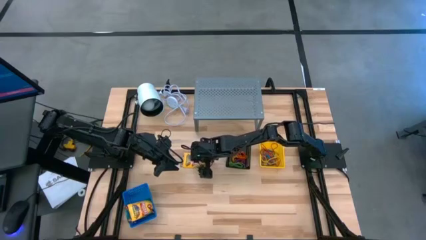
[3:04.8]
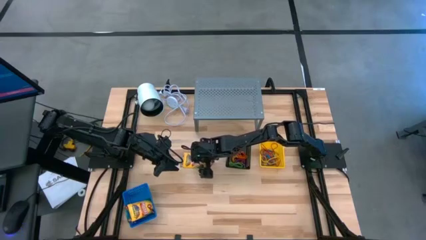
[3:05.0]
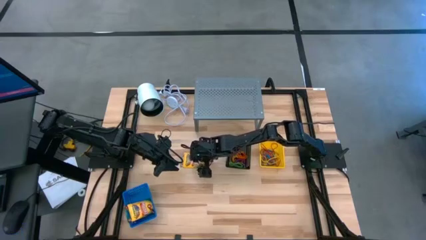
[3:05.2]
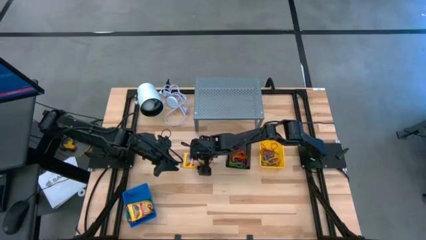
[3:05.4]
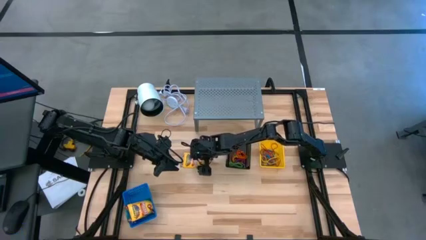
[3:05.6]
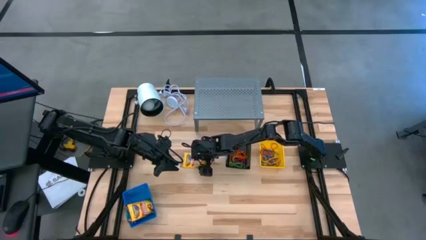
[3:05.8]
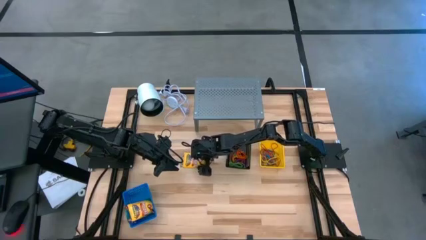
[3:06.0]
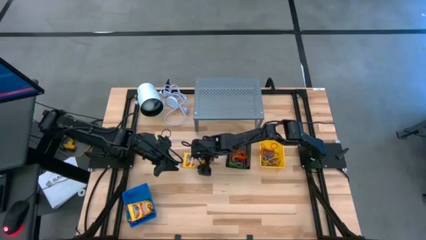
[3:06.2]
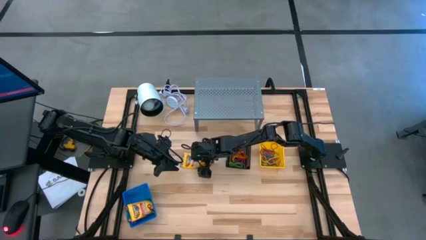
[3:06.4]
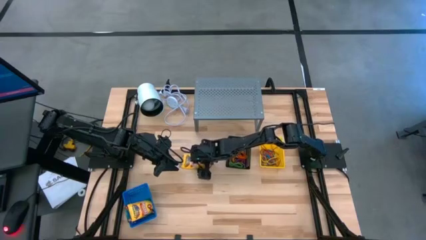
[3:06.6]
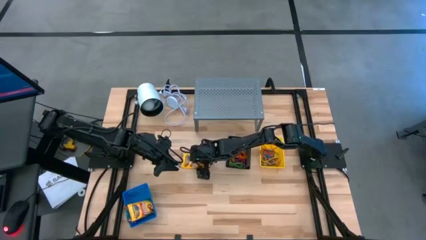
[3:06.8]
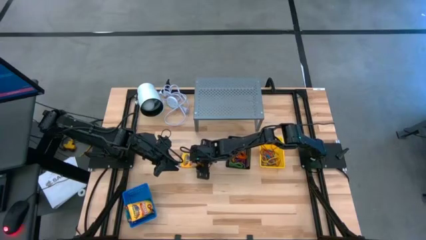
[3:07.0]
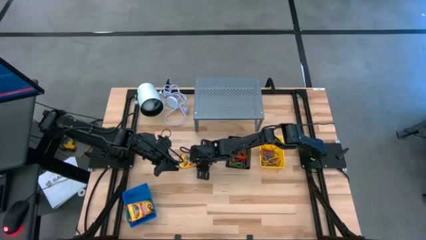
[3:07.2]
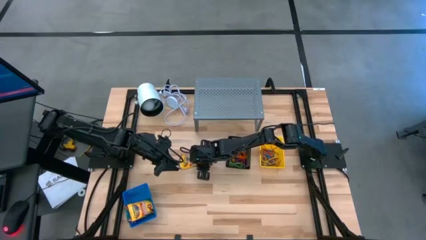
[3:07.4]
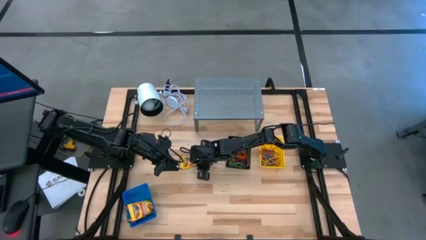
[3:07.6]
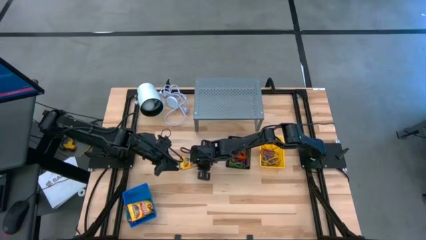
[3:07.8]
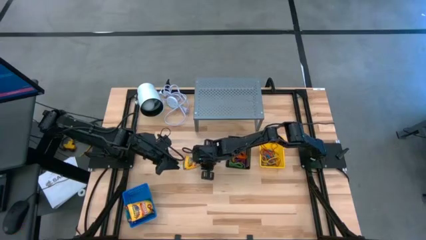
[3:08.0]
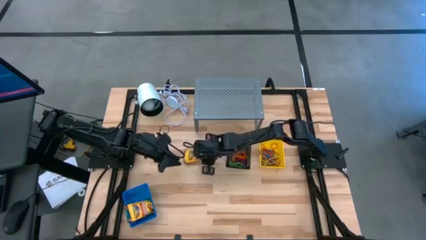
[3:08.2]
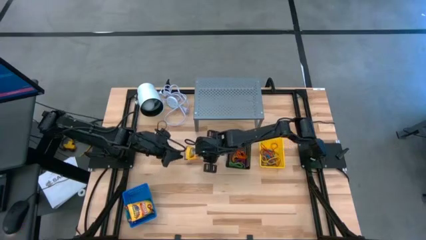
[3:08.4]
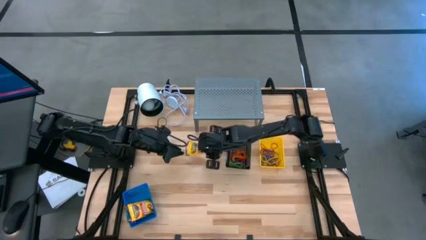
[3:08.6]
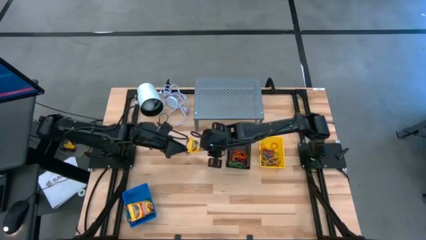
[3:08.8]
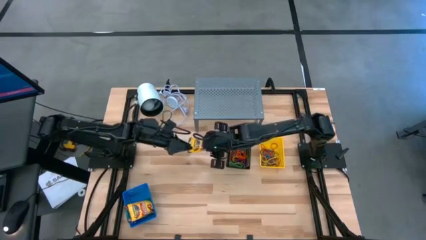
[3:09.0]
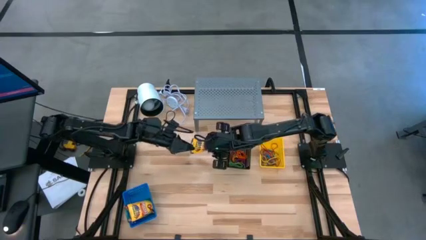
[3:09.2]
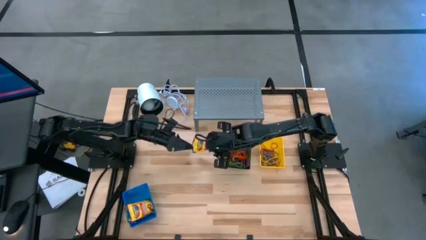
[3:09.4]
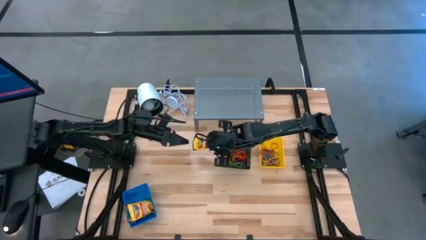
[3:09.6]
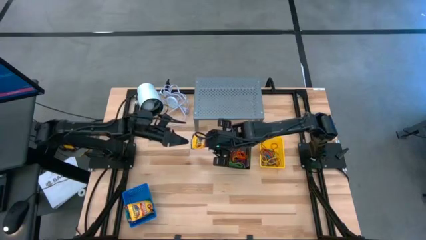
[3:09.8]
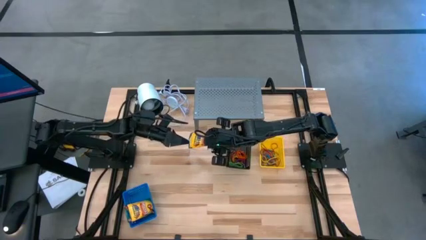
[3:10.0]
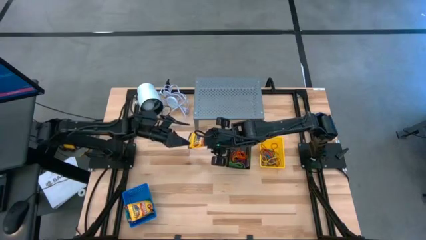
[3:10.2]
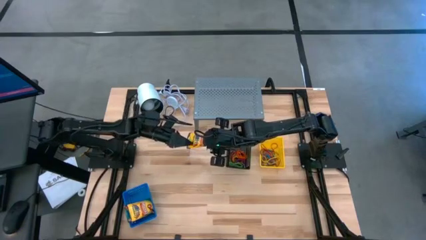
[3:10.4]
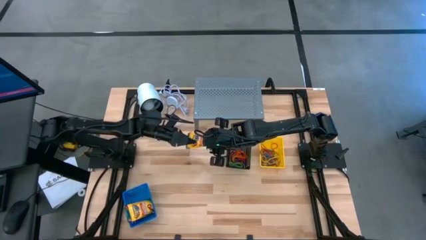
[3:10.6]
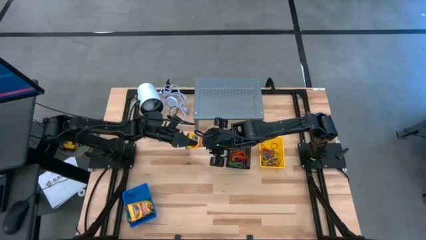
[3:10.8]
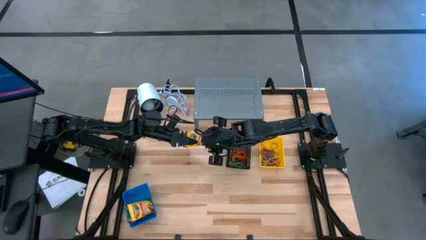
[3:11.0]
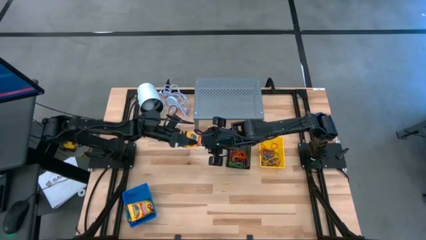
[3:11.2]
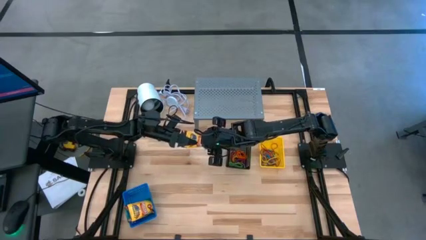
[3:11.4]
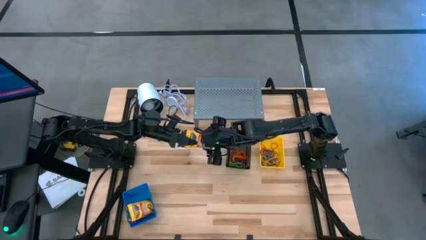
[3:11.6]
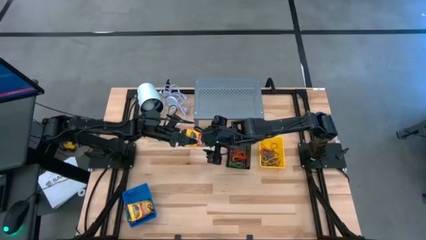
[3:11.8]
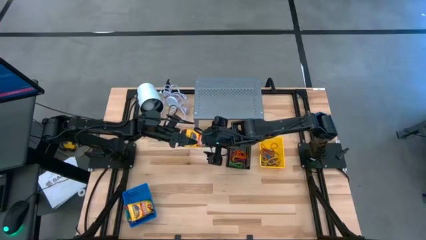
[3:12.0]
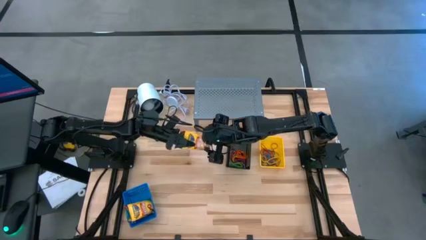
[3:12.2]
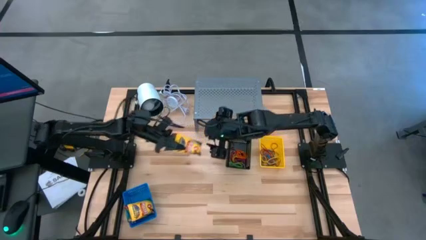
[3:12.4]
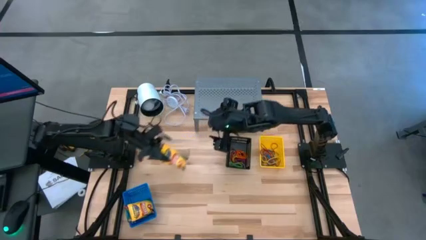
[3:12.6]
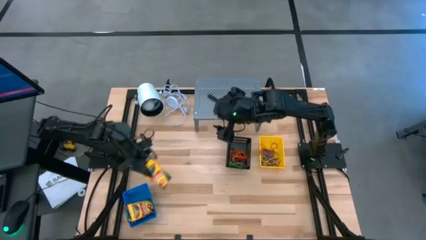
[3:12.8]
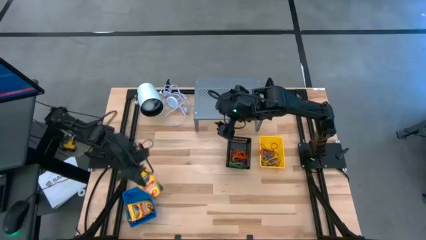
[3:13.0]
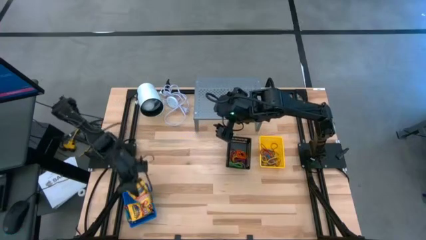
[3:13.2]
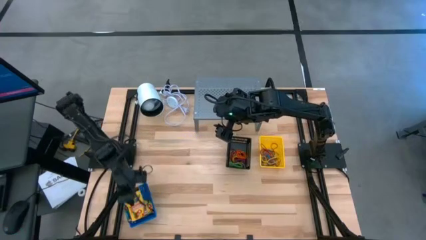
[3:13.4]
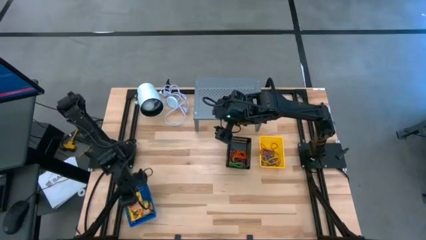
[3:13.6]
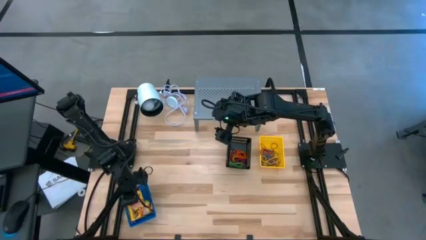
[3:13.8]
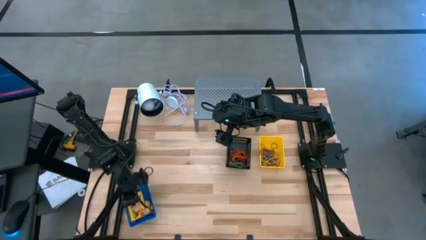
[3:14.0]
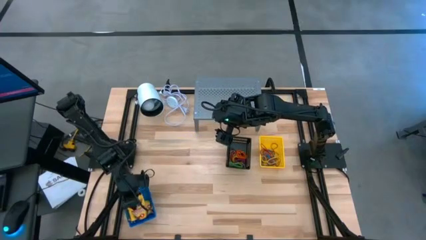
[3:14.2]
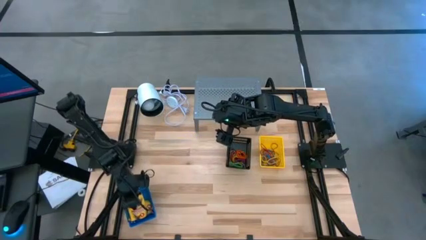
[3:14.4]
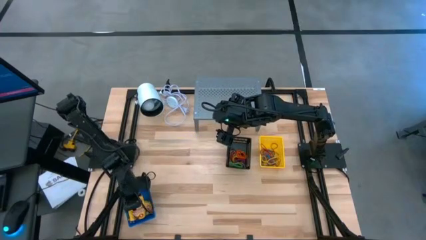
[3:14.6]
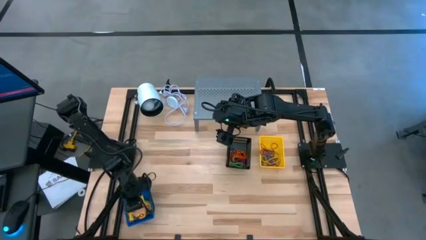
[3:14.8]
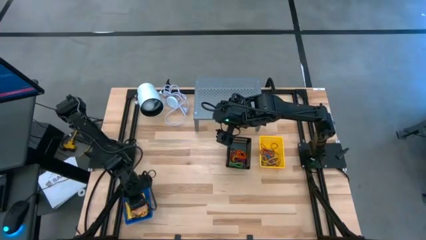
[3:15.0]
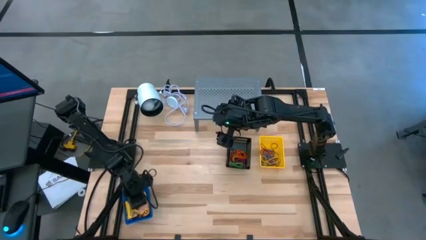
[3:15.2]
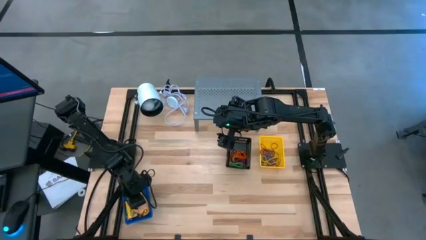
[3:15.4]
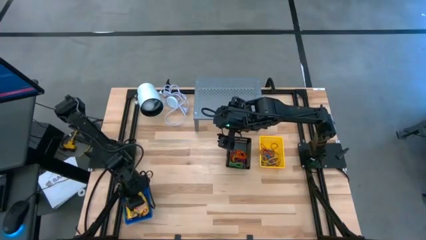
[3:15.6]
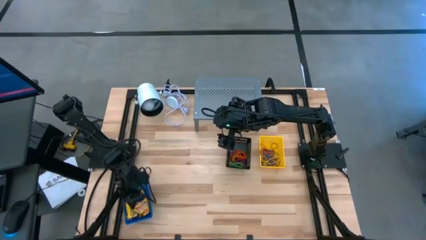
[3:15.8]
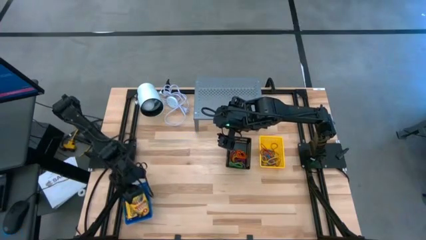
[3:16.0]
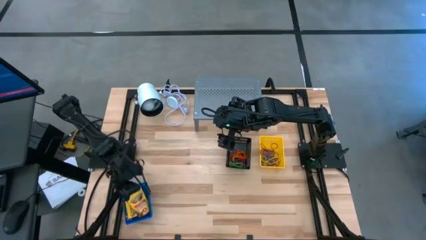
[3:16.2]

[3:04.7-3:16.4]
Task: Pick & Place Office Desk Supplies
Put the middle left crayons box into the blue basket

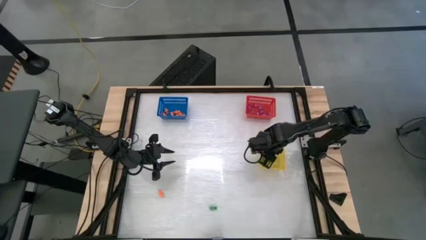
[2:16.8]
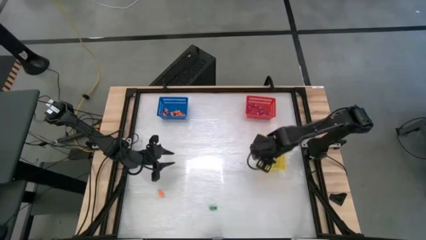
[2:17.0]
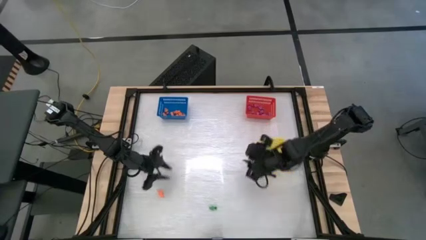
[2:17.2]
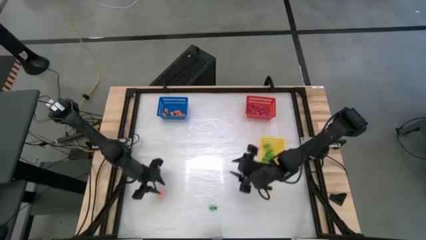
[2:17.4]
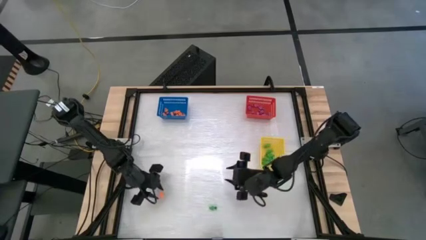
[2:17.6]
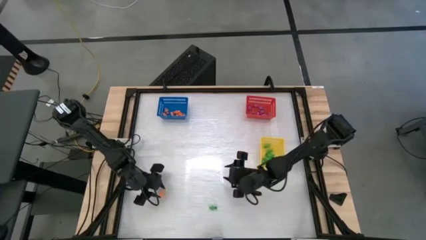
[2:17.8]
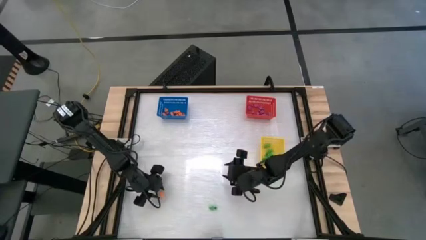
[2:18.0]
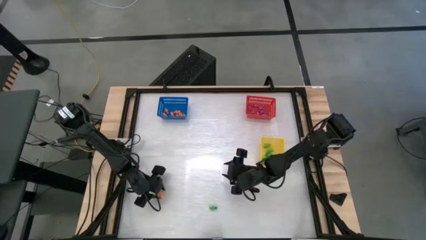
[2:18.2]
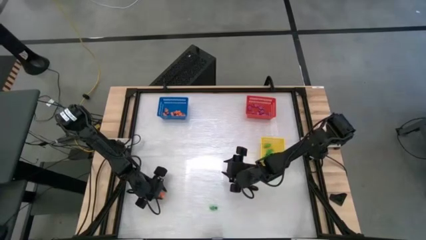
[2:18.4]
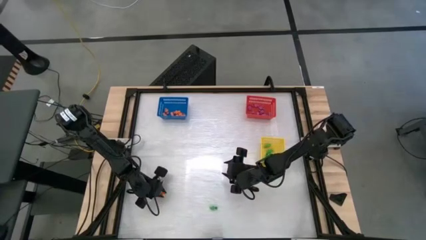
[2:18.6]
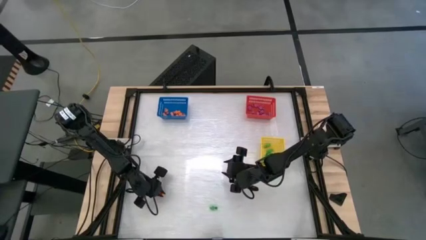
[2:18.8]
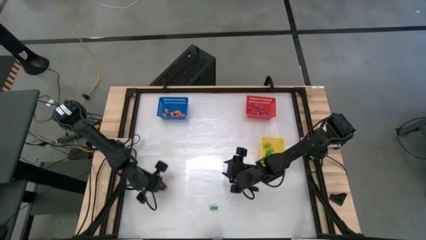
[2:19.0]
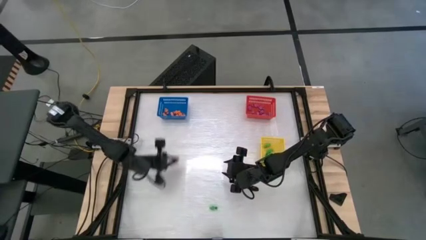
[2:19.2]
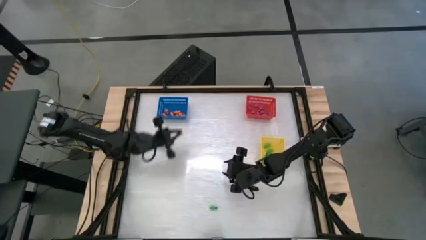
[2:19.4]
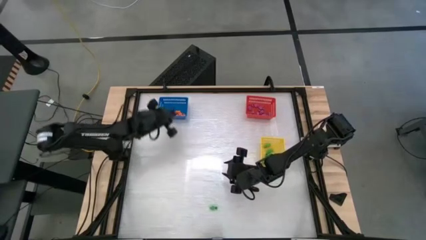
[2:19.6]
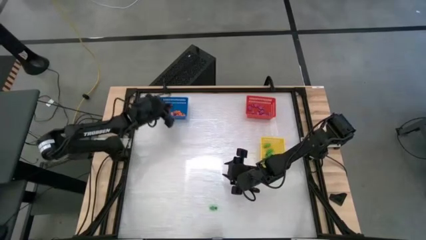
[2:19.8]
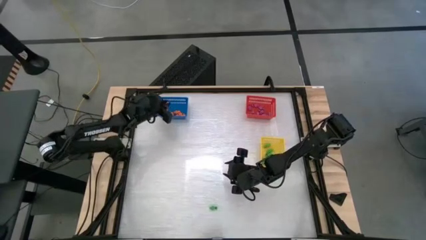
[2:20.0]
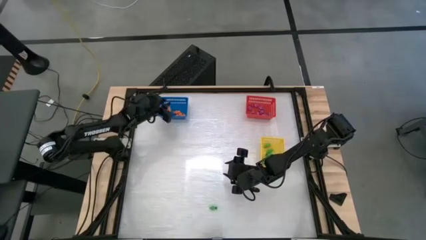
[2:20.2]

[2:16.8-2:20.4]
Task: Sort Halloween decoration
Put the orange skeleton toy into the blue bin

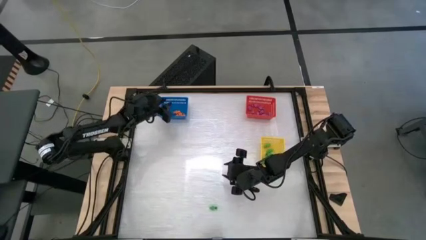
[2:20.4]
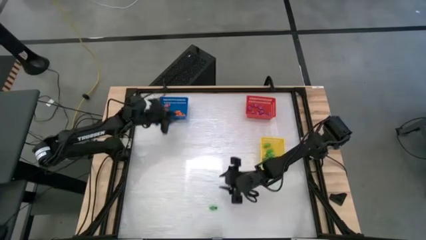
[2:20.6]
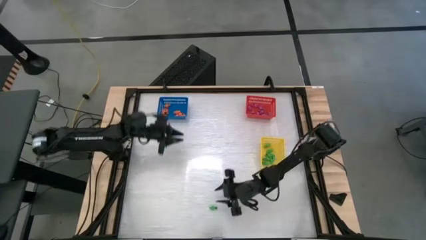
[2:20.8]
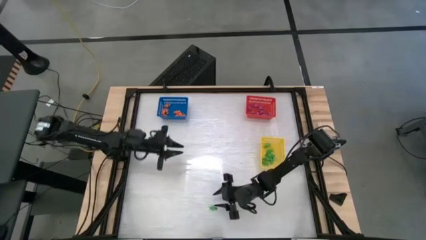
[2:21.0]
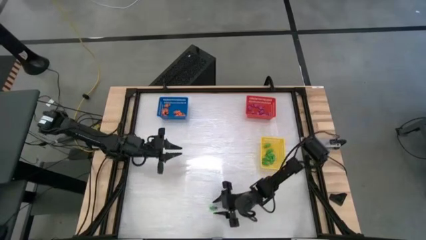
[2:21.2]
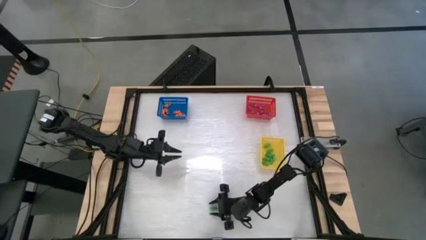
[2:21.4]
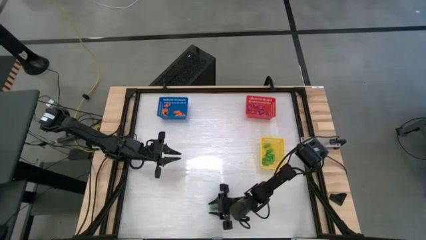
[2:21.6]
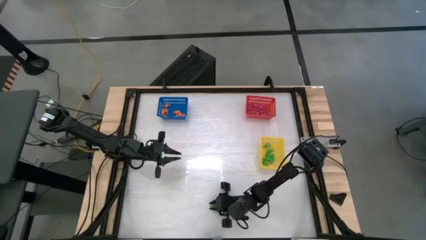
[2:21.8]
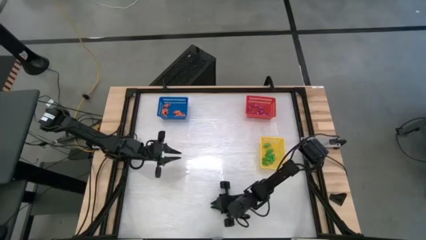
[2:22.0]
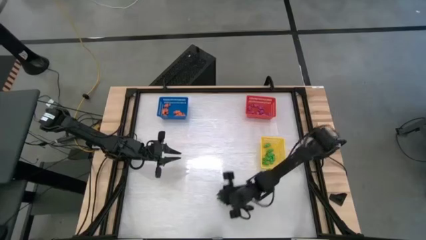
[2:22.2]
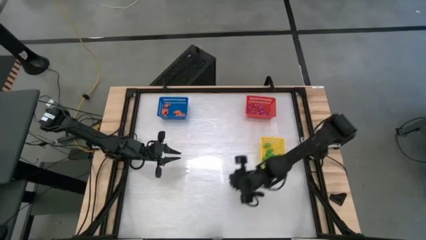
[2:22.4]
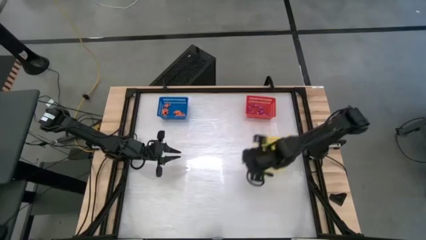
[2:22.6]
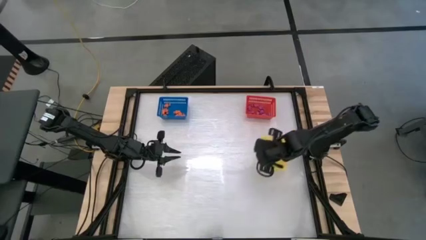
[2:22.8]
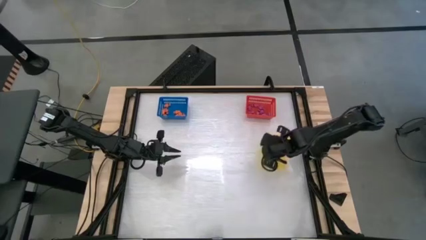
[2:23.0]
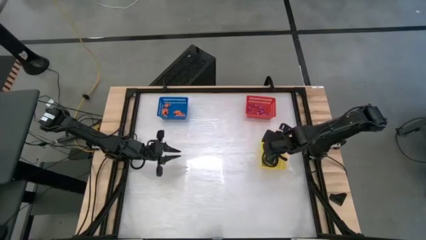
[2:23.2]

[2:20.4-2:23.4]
Put the green skeleton toy into the red bin
